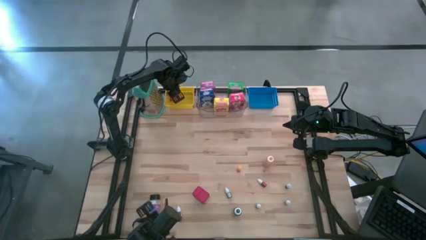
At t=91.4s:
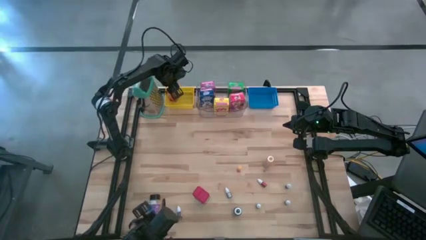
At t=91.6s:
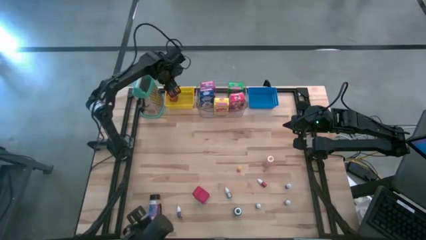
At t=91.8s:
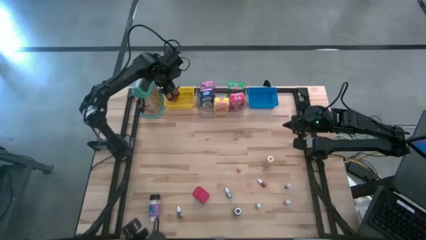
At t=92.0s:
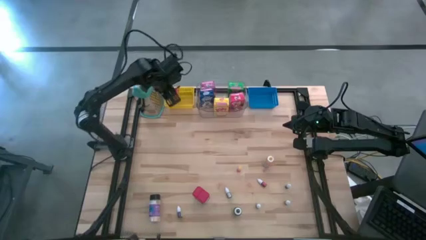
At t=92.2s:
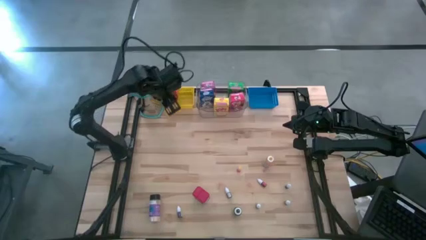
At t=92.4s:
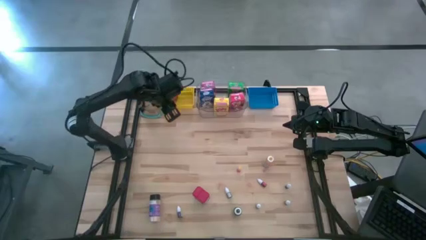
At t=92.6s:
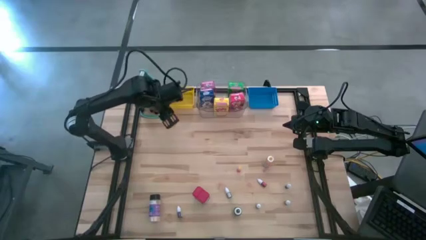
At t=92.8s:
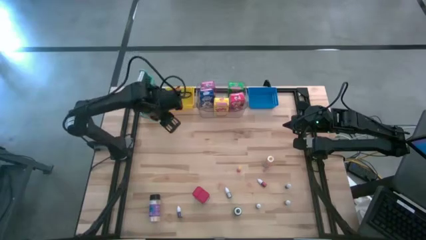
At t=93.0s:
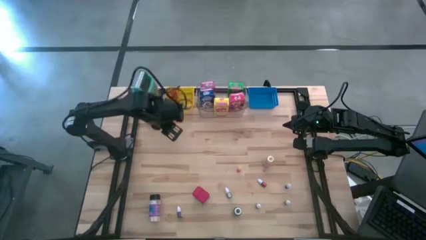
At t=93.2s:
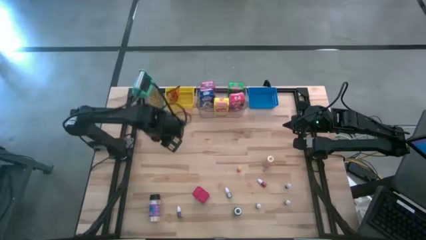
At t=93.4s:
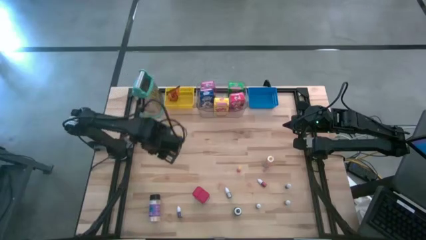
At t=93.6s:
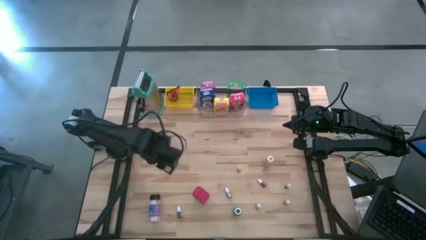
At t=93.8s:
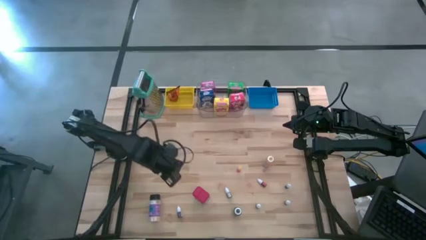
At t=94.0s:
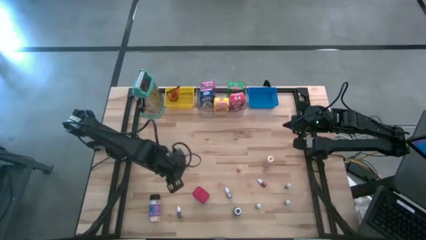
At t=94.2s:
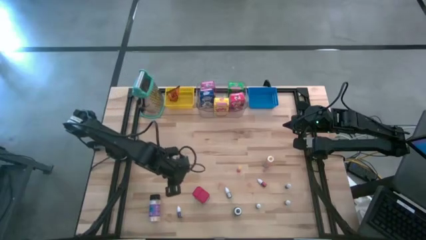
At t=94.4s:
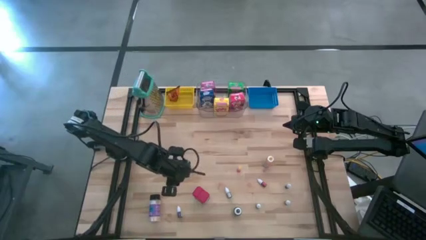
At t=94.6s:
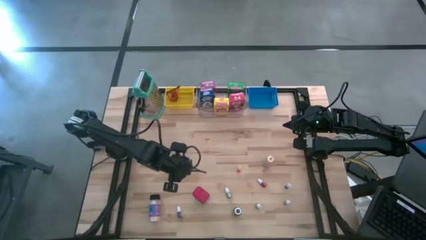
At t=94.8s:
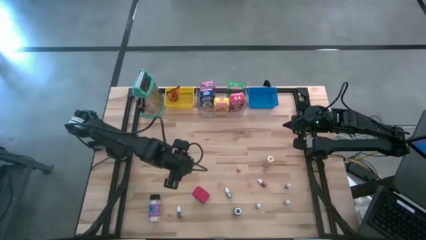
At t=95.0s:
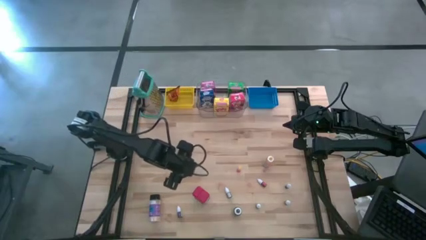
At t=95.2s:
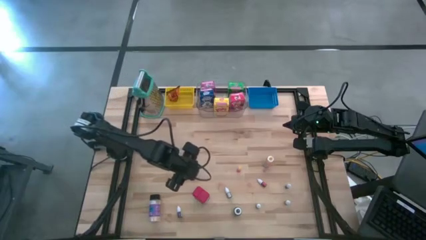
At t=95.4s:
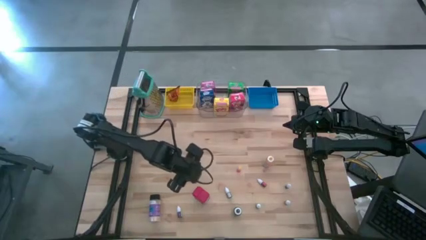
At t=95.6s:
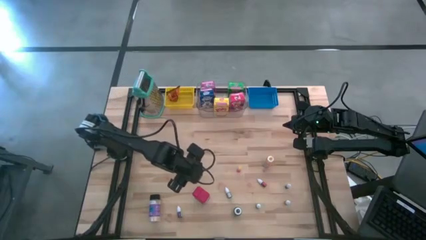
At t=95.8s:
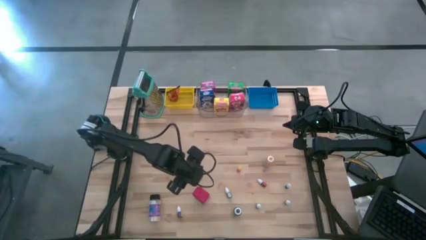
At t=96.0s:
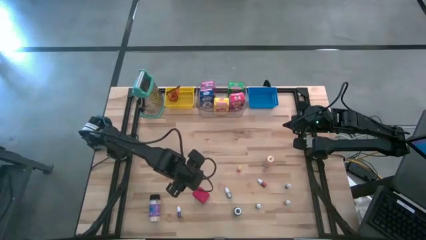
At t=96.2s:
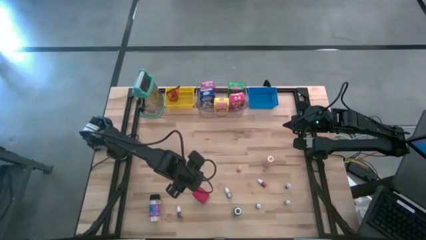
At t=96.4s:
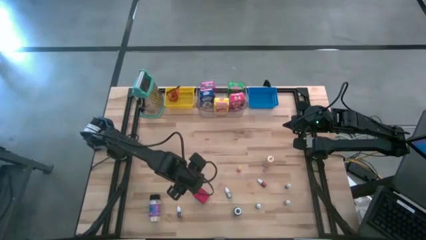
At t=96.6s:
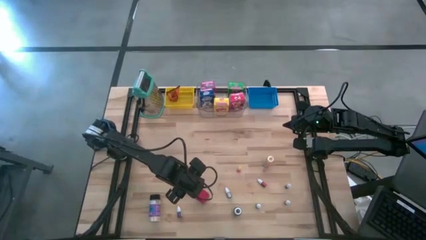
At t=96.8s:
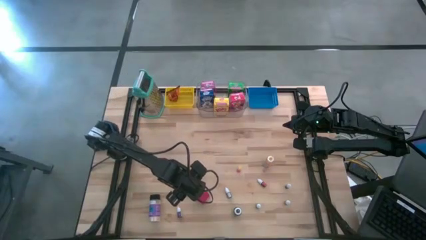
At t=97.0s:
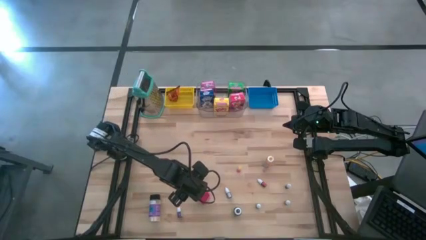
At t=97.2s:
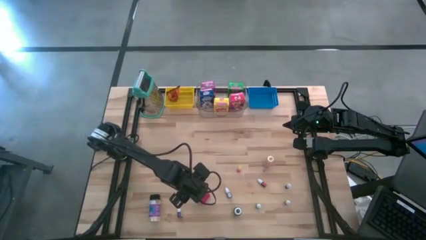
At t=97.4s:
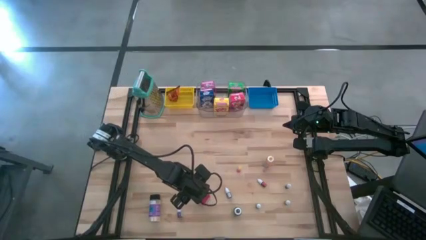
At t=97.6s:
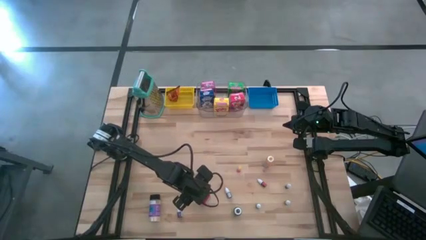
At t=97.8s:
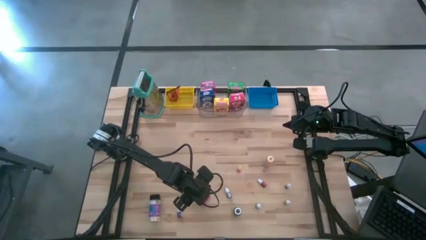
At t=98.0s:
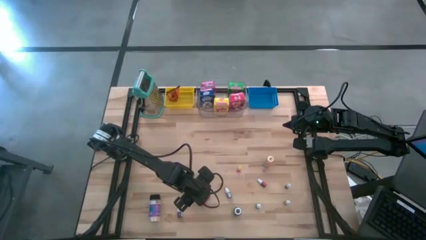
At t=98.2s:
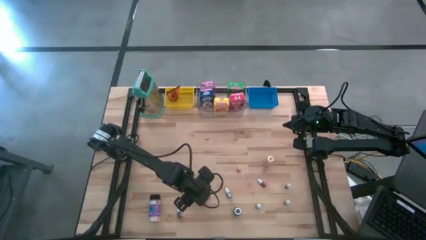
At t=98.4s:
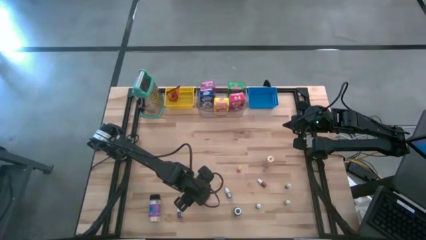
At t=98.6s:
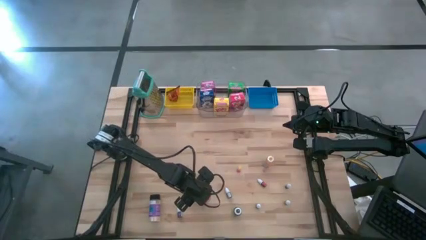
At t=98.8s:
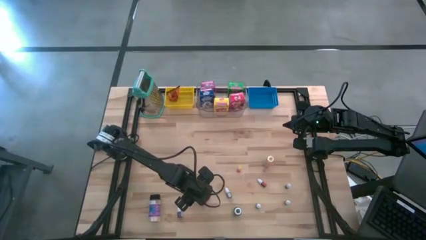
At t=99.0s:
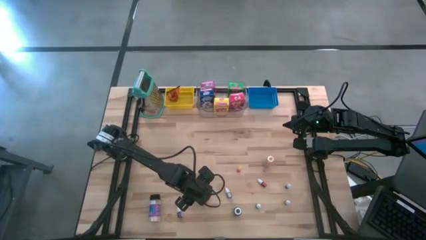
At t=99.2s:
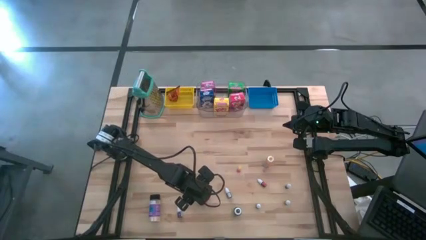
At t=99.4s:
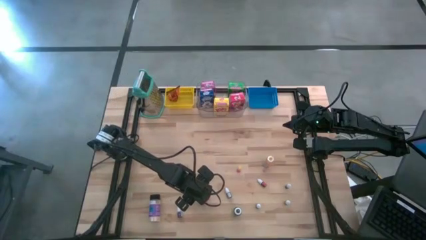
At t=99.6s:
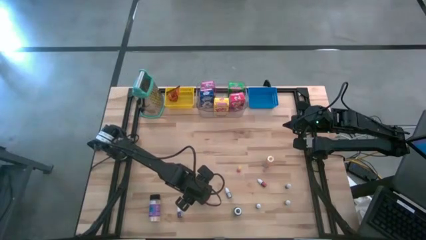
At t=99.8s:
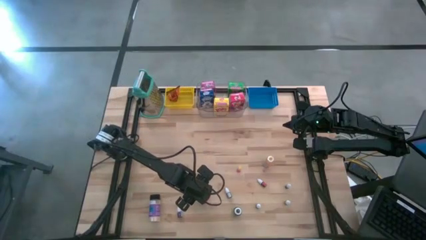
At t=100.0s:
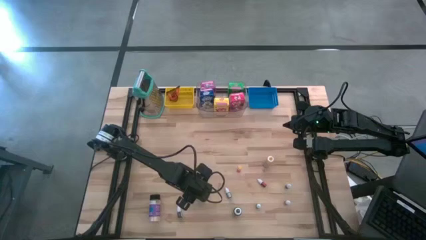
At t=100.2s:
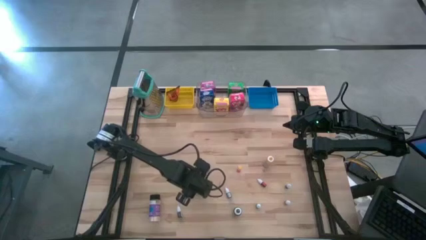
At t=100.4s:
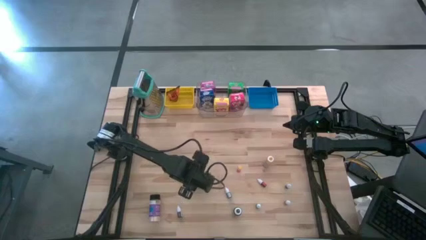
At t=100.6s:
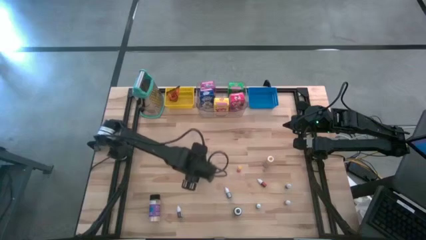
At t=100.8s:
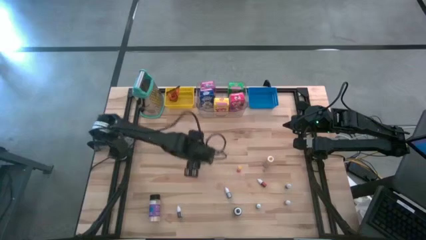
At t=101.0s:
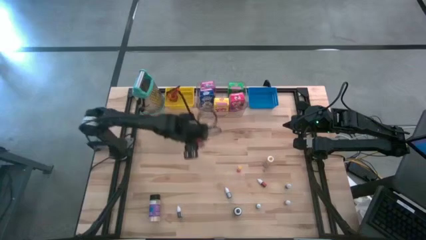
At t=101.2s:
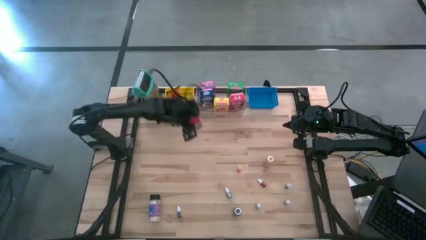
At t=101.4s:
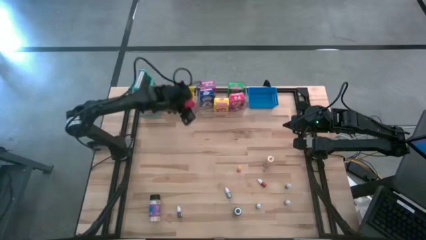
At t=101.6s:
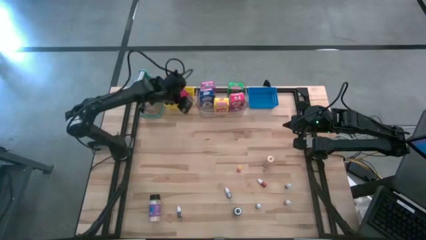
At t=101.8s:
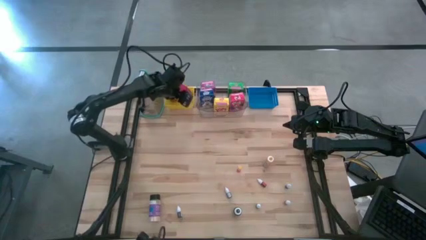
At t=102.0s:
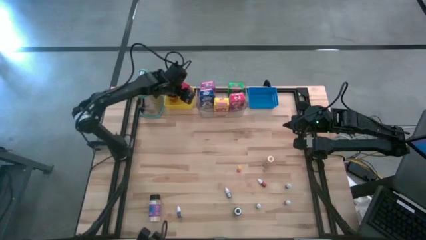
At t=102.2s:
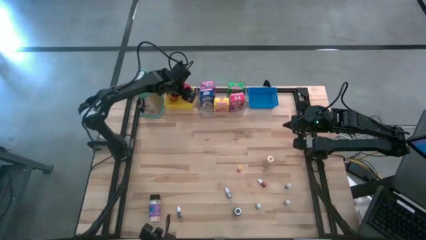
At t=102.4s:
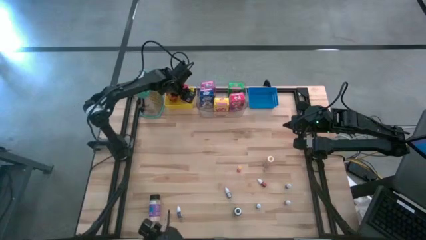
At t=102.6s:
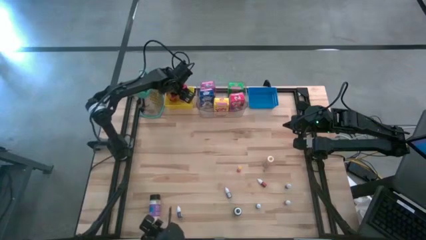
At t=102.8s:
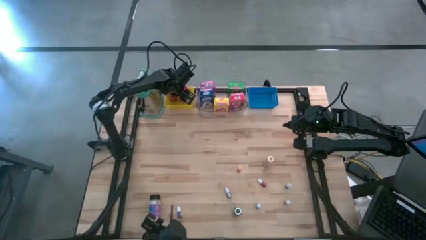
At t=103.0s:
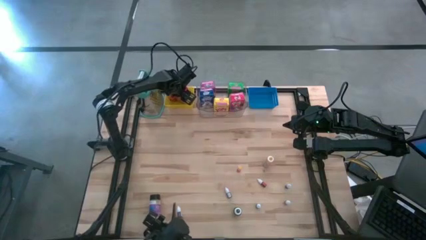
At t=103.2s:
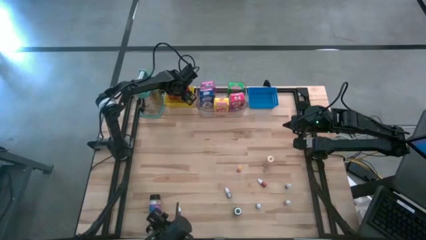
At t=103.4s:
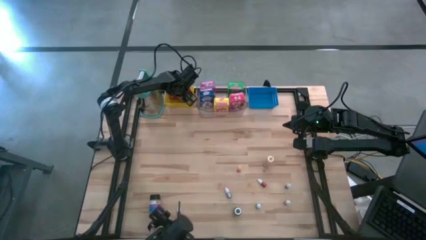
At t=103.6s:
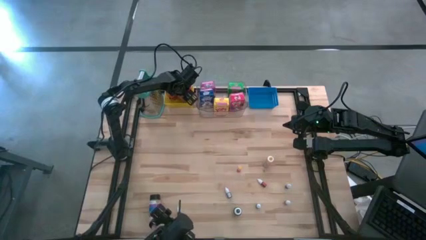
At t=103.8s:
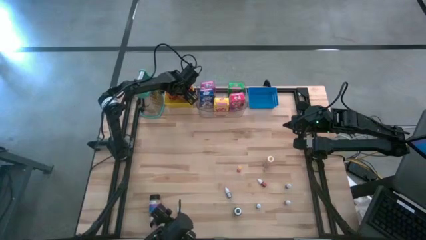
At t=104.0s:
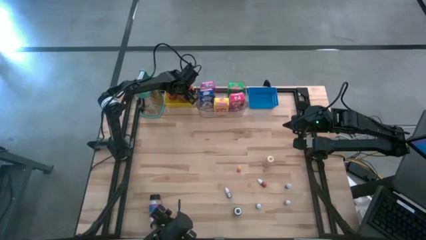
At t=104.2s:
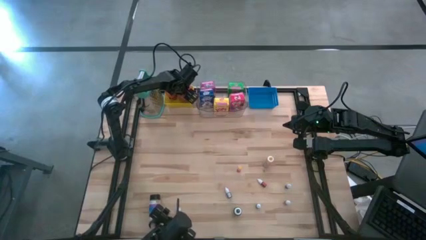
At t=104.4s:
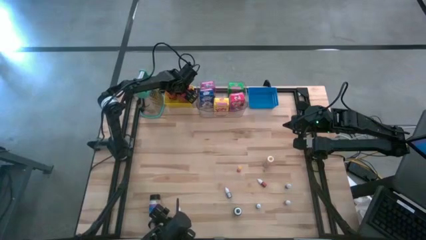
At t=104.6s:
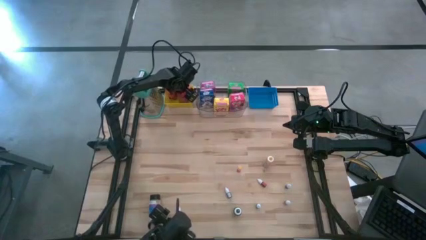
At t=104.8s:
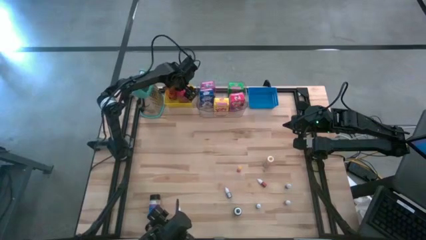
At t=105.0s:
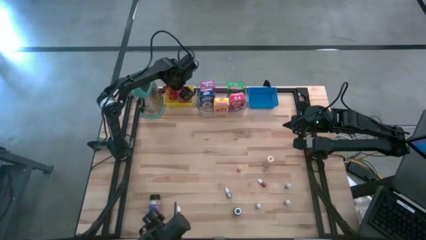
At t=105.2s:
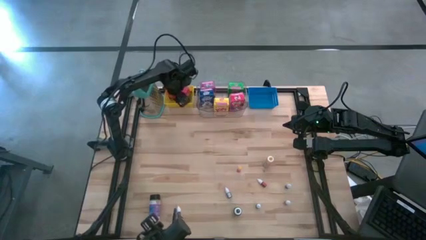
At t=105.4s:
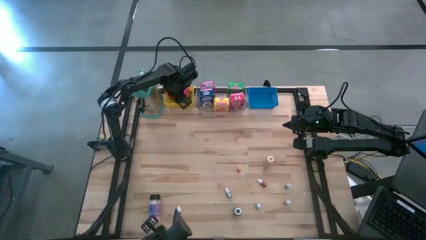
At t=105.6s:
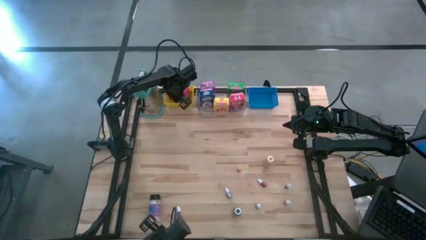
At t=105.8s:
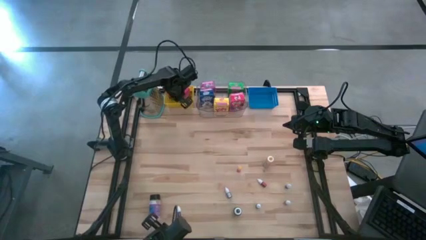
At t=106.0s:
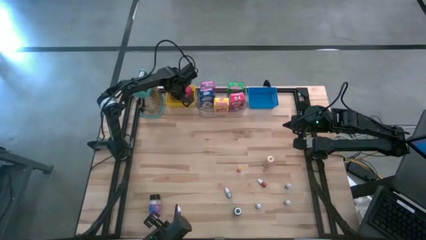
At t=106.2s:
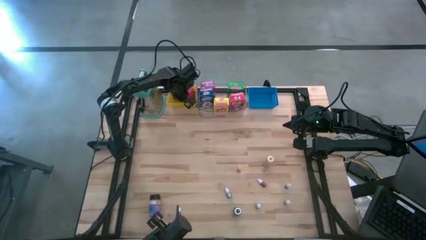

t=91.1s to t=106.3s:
Task: Pick & Place Kitchen Items
Put the red seasoning can into the yellow bin
